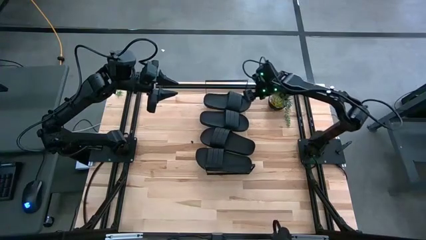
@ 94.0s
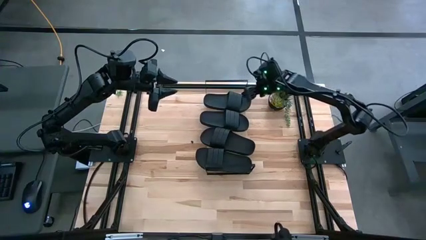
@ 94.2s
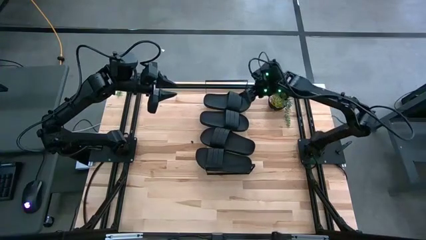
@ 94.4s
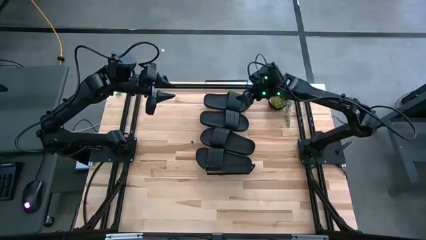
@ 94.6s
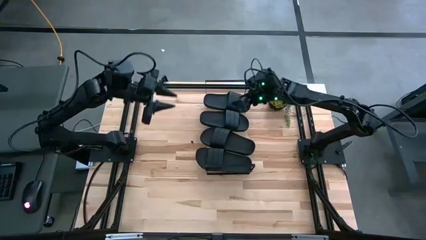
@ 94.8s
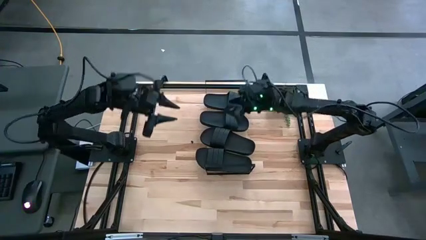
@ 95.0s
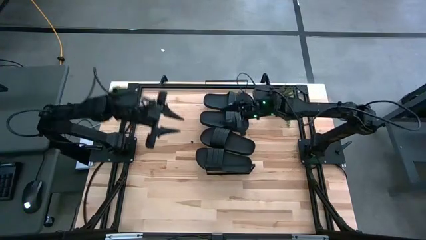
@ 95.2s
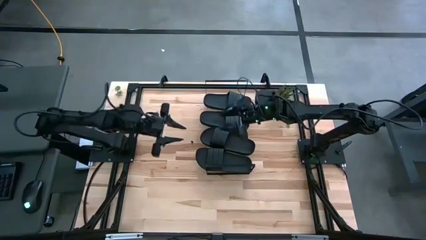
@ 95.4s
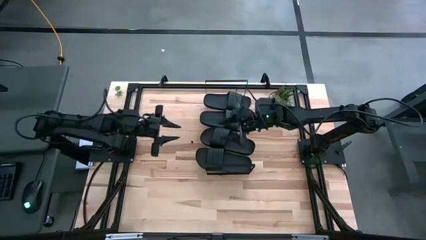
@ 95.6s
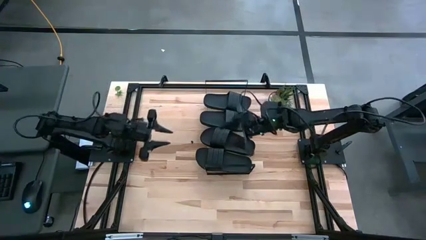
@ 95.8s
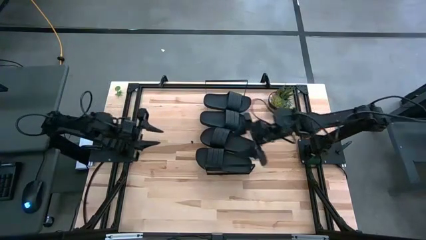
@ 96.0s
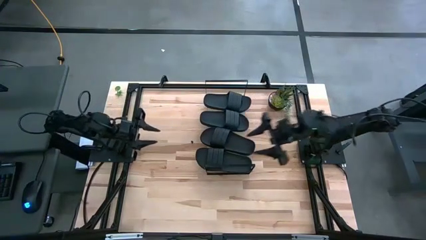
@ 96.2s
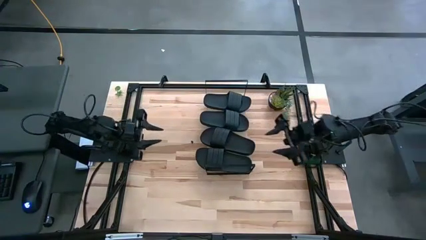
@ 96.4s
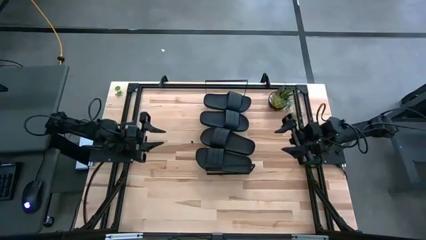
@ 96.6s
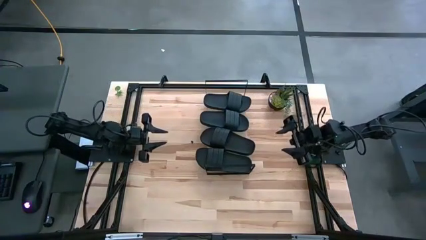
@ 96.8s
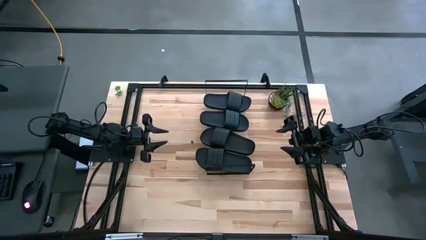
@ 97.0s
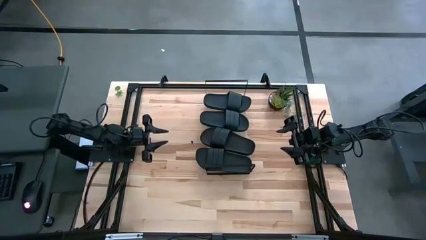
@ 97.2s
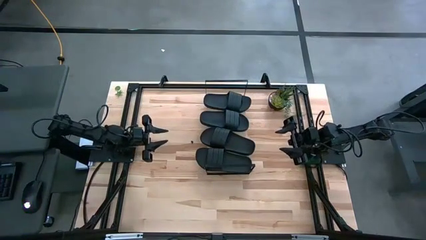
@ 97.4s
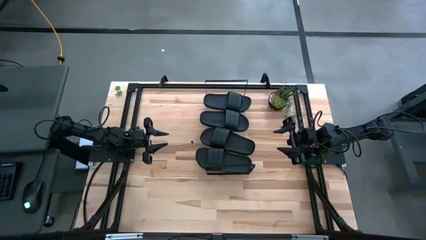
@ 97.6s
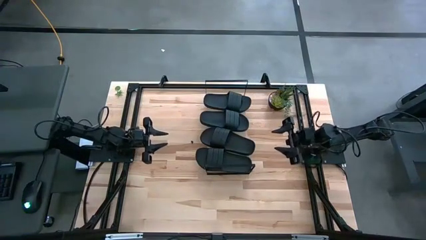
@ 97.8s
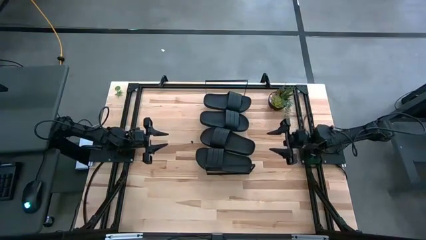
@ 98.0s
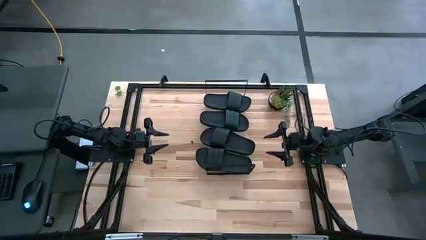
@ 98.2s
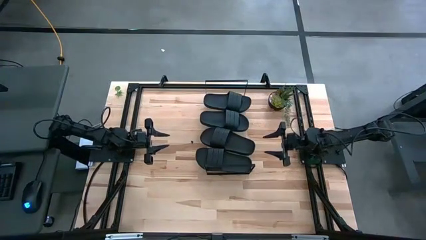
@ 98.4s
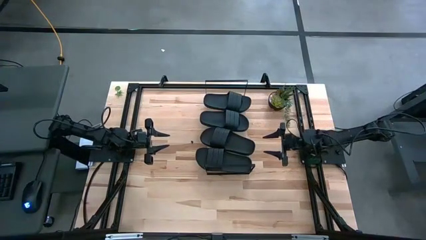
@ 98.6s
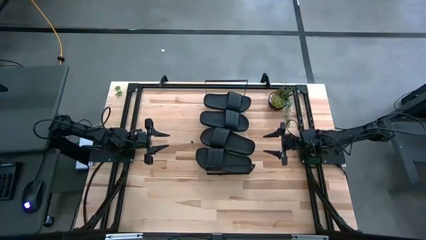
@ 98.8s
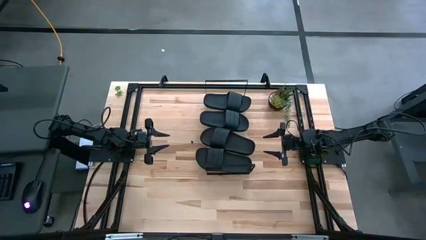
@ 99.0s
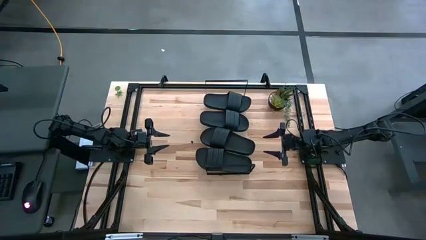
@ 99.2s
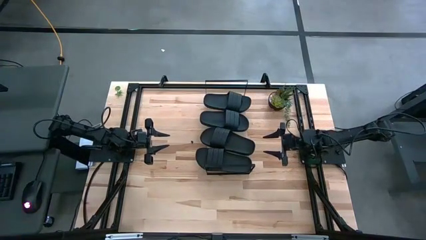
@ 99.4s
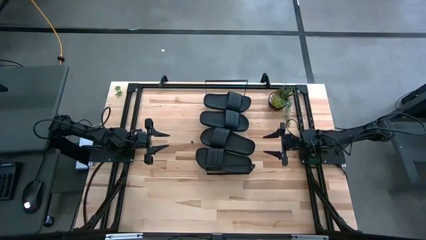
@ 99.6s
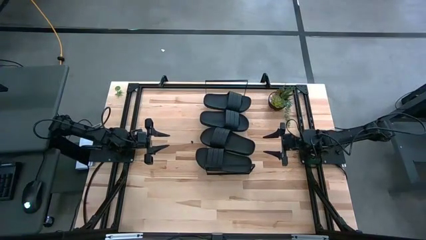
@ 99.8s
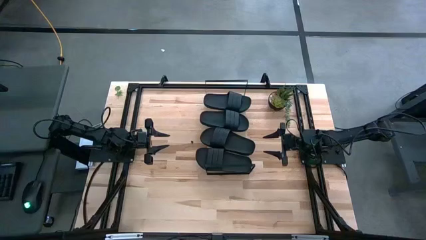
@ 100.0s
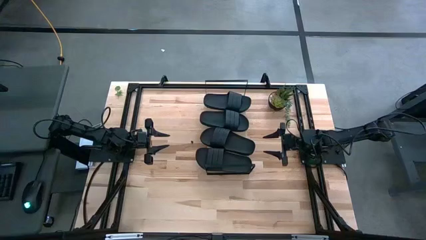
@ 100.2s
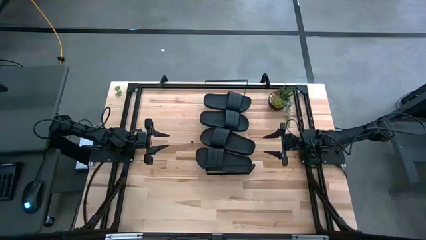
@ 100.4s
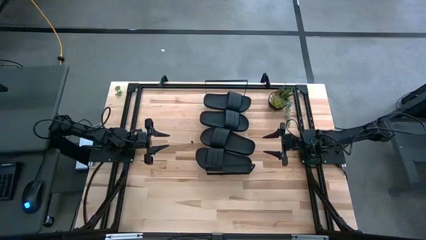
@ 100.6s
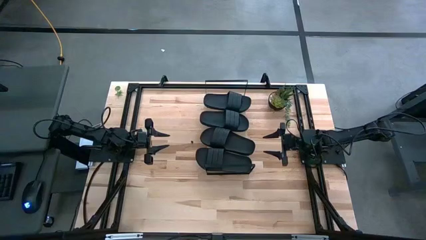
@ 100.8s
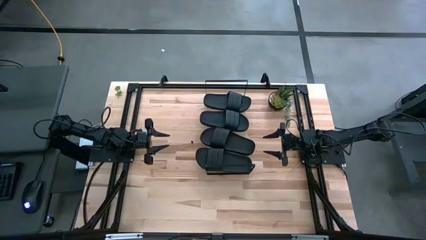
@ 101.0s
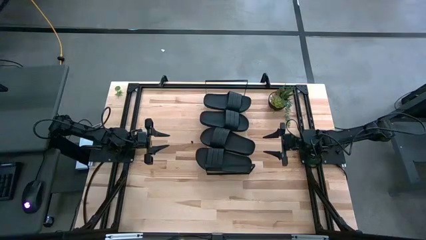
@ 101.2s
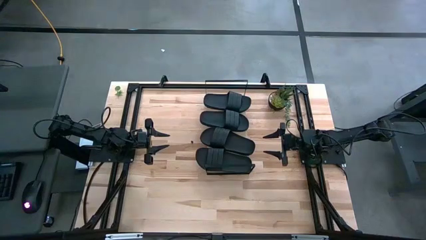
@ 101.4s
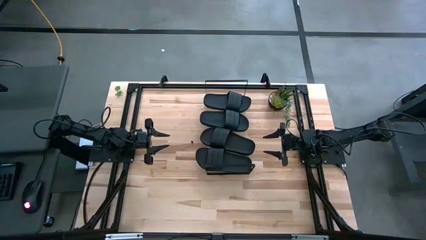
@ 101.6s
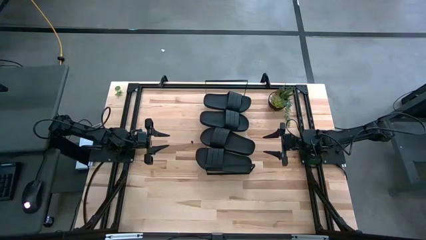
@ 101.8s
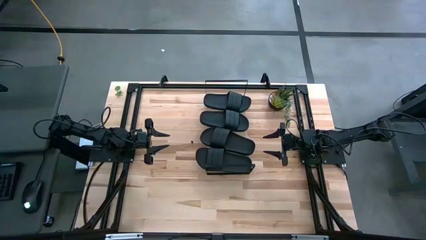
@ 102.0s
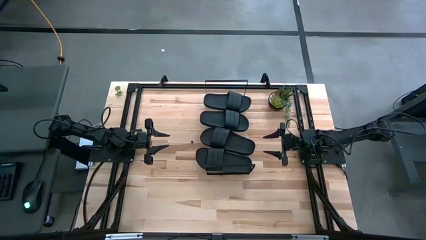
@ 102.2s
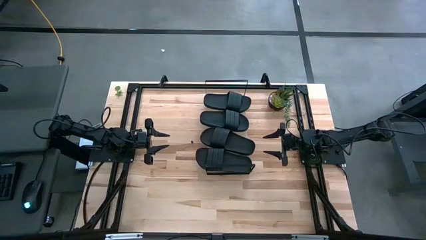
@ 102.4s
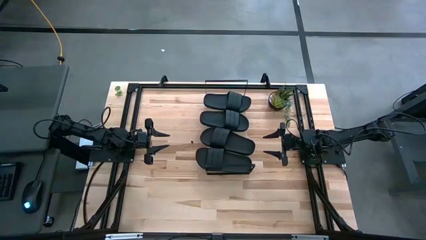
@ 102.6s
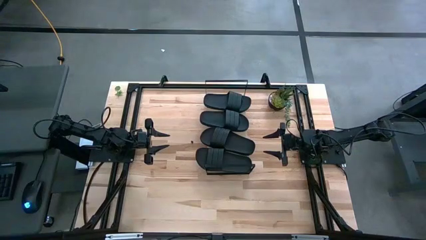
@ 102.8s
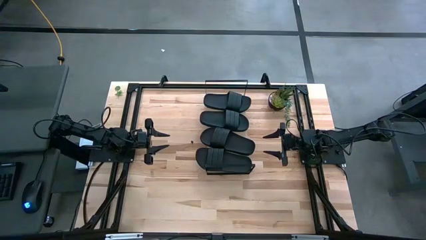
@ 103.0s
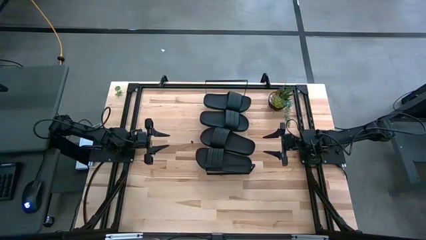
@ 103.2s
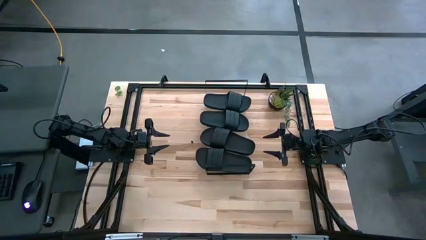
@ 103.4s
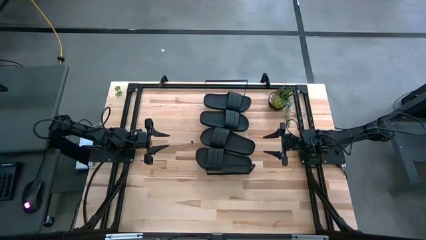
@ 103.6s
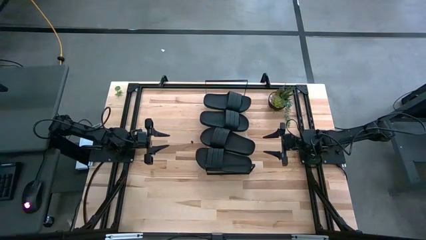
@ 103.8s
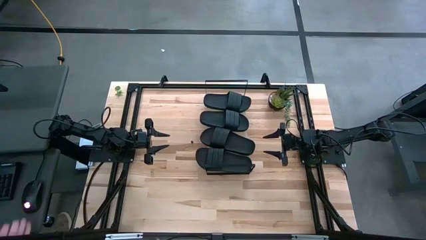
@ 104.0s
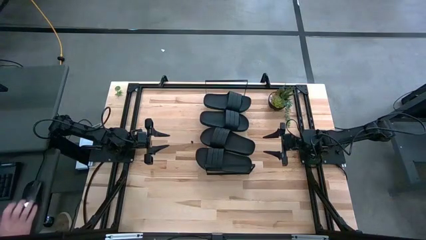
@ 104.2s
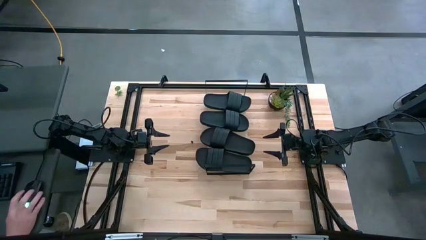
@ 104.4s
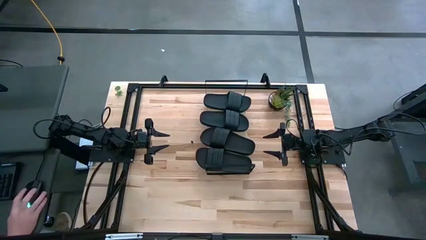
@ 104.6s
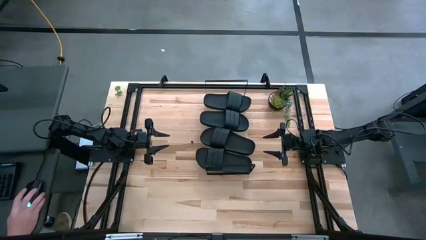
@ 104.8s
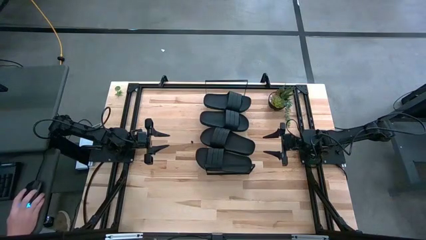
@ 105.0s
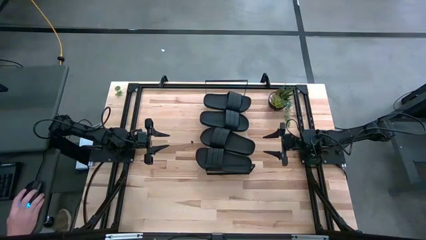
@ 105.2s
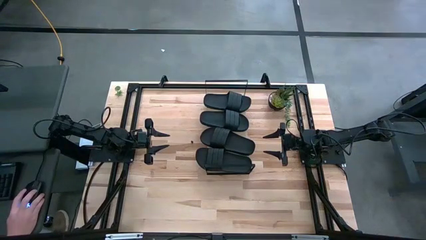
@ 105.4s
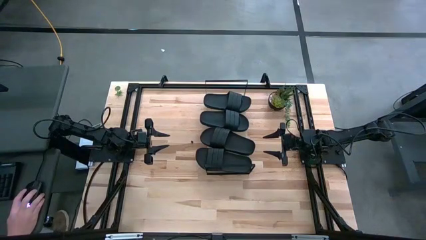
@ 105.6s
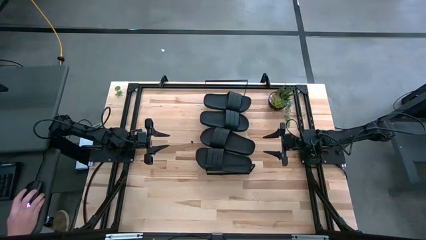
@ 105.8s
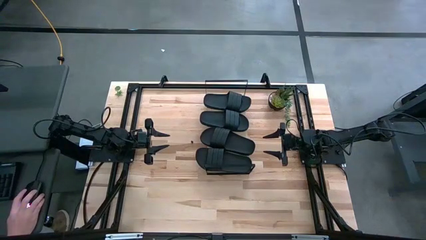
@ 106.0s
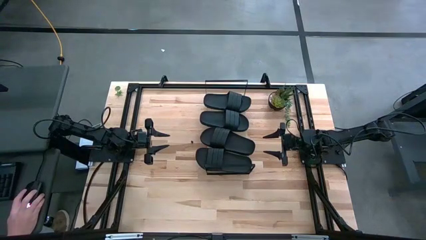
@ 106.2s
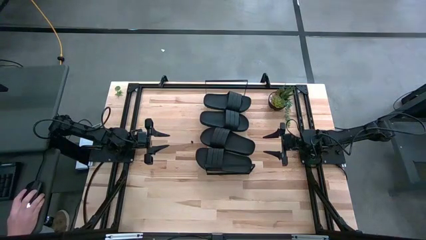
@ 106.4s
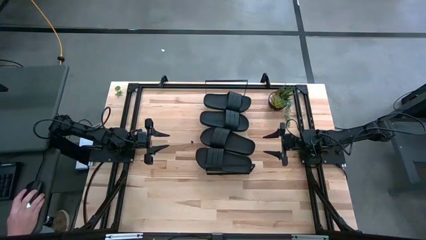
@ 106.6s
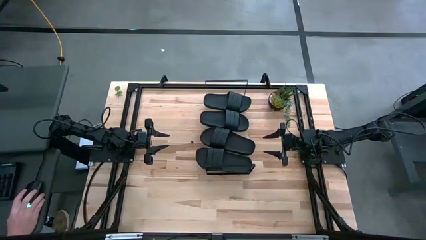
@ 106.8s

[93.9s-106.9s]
Task: Pick and place slides into the shelf
Return to Home Position

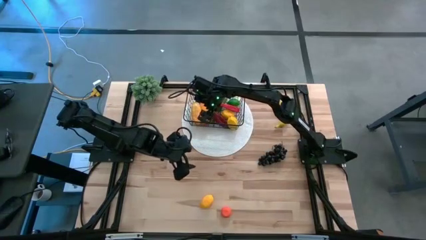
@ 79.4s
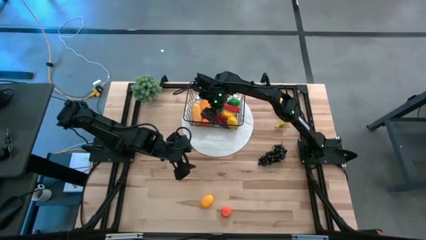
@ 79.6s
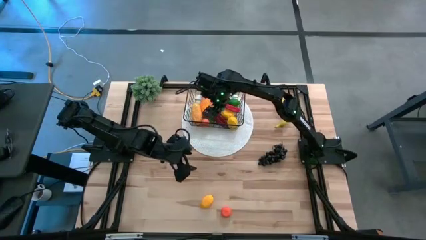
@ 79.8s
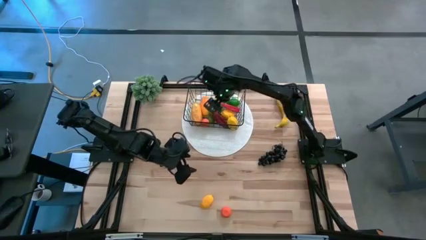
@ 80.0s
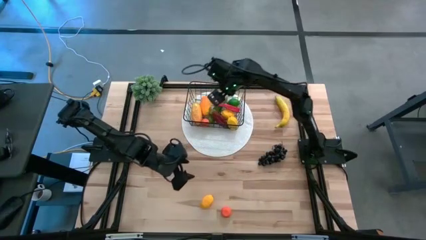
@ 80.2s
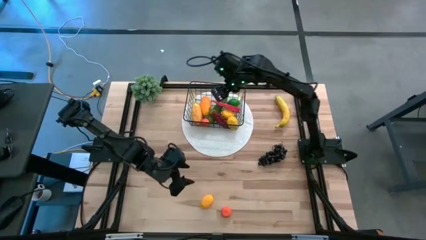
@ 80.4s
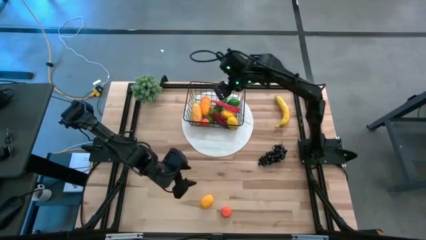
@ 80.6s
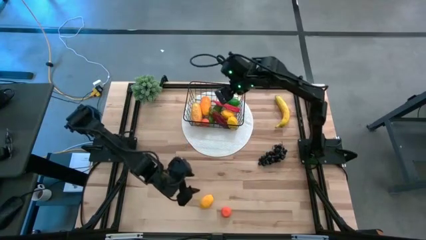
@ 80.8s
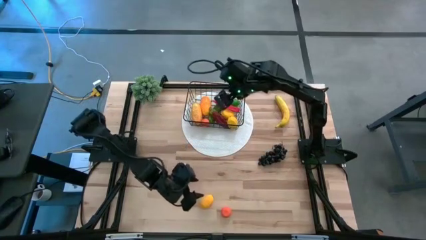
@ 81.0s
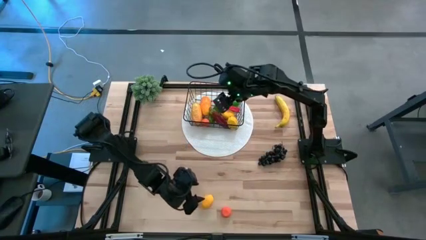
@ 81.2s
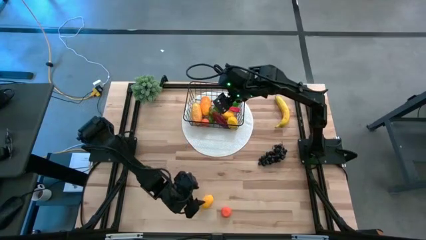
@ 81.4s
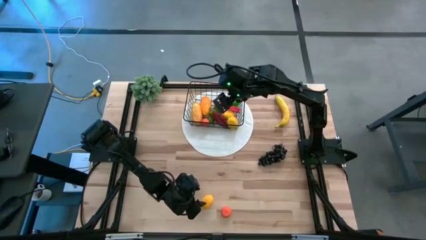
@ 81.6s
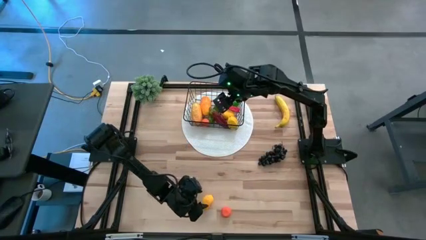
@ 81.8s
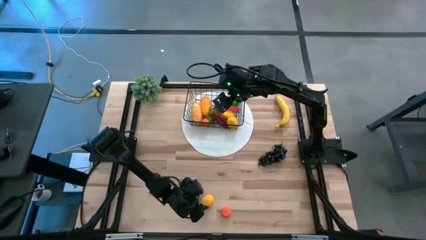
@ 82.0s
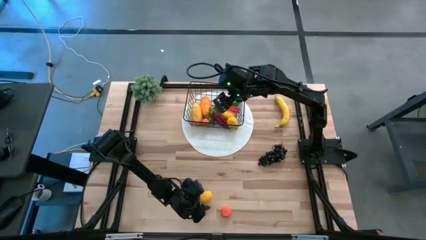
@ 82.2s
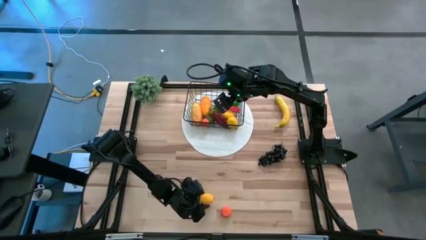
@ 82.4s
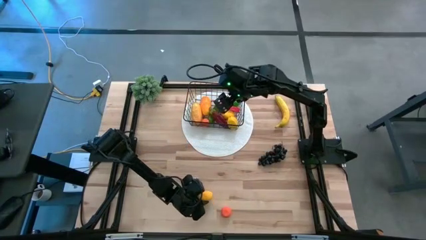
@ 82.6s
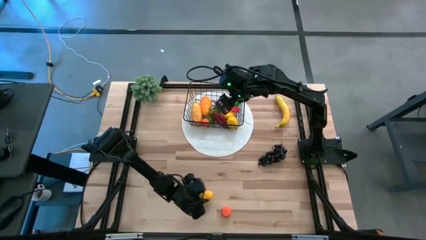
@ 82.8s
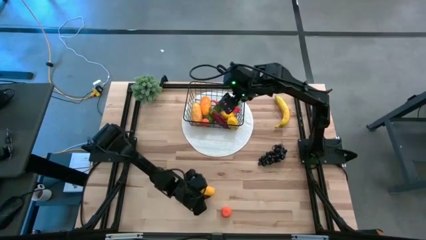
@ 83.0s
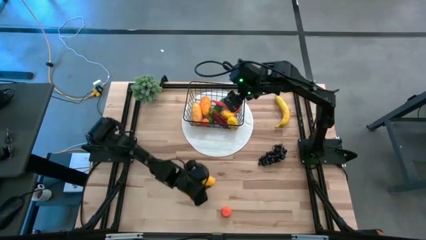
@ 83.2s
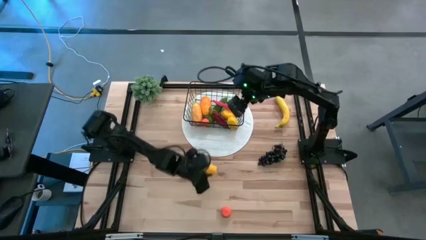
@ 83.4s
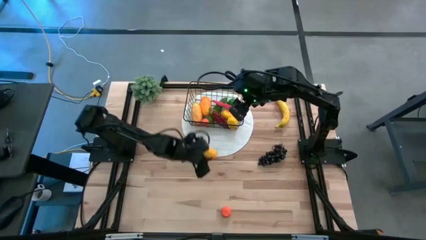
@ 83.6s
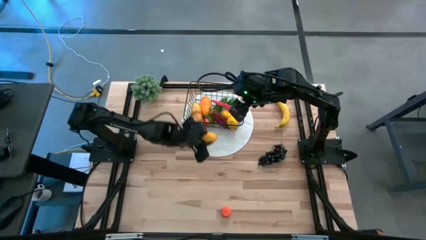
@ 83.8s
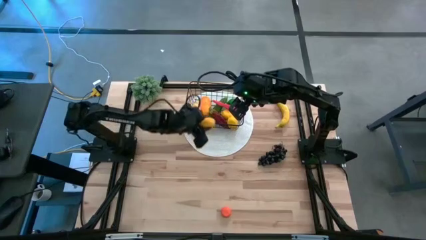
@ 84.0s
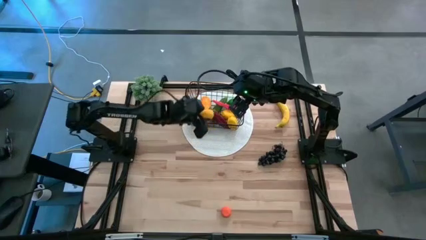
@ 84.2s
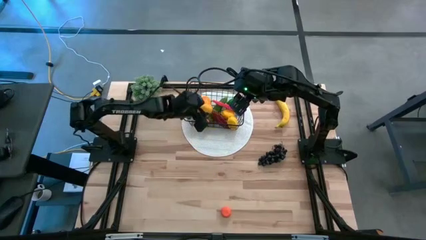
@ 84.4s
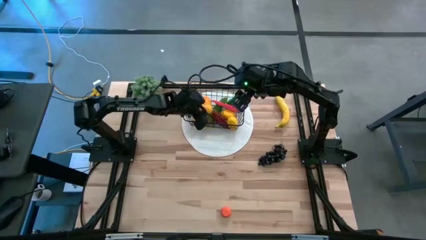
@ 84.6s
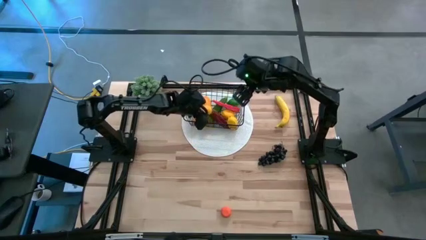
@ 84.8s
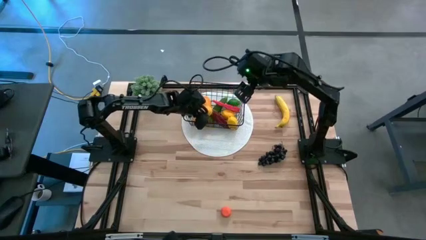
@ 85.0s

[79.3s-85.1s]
Task: Build produce basket
Put the lemon into the wire basket
